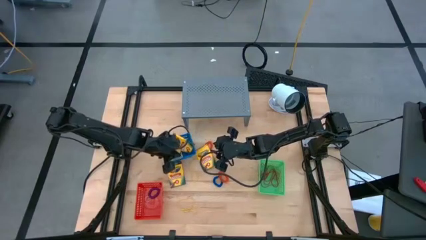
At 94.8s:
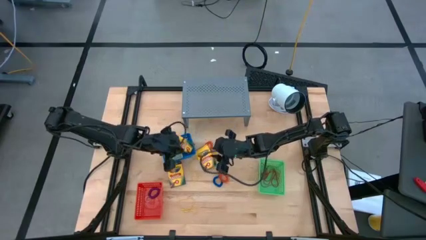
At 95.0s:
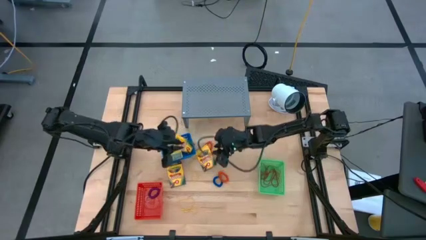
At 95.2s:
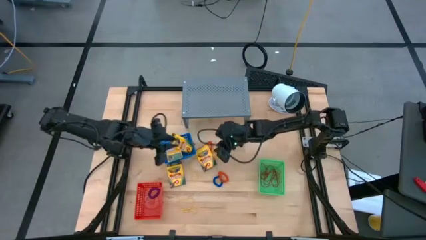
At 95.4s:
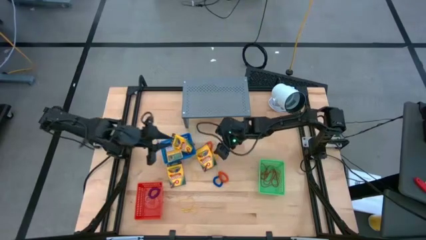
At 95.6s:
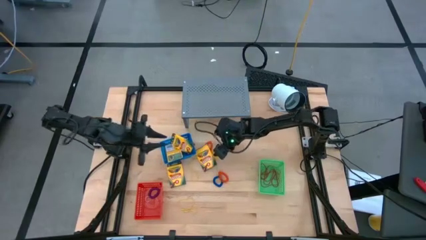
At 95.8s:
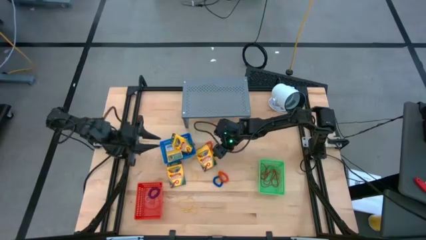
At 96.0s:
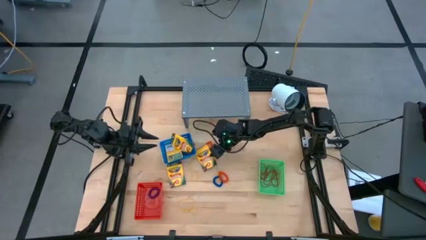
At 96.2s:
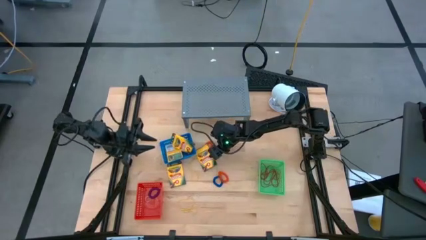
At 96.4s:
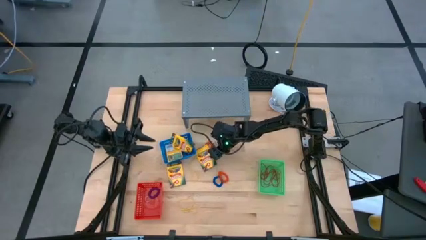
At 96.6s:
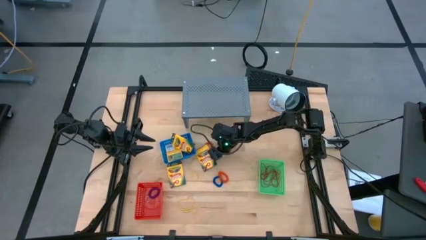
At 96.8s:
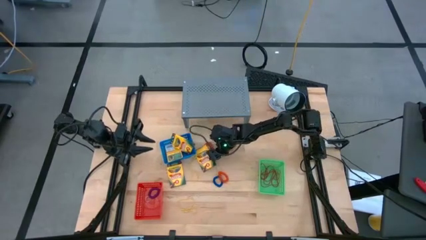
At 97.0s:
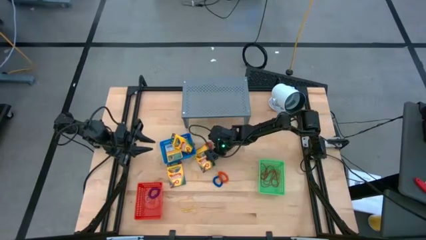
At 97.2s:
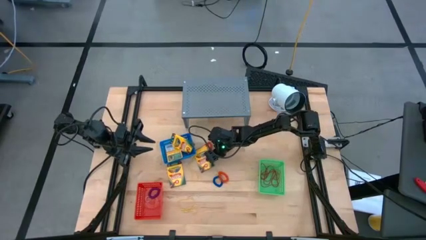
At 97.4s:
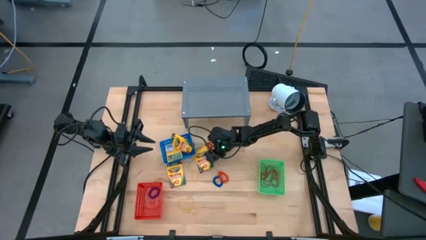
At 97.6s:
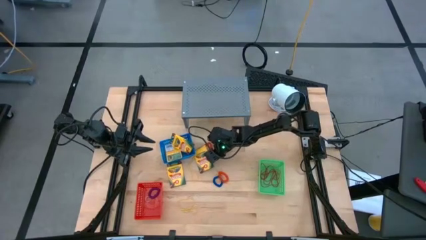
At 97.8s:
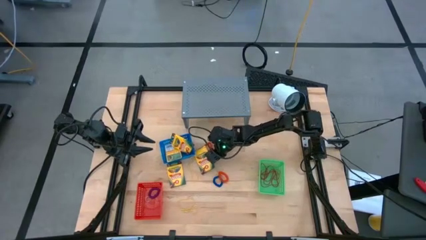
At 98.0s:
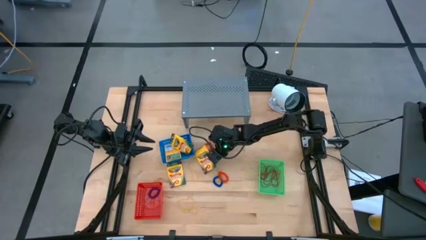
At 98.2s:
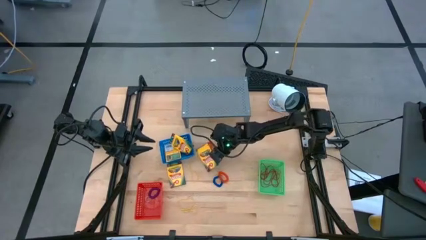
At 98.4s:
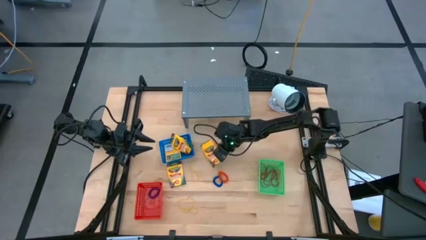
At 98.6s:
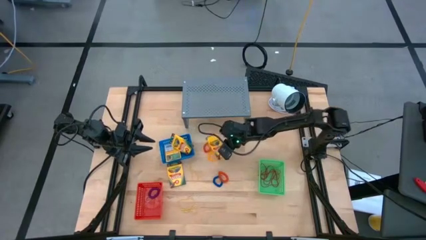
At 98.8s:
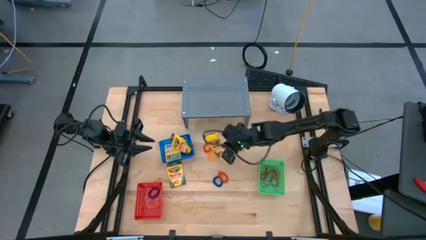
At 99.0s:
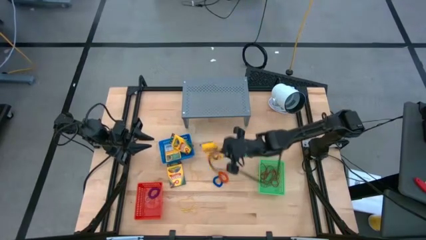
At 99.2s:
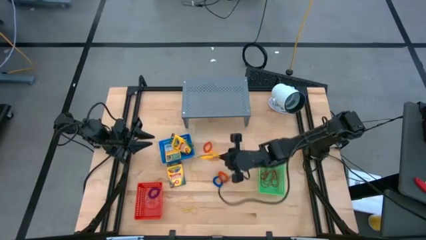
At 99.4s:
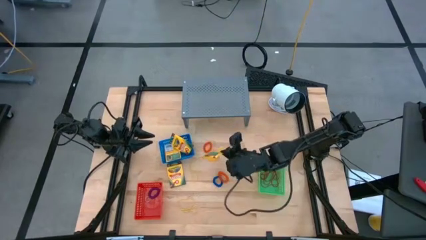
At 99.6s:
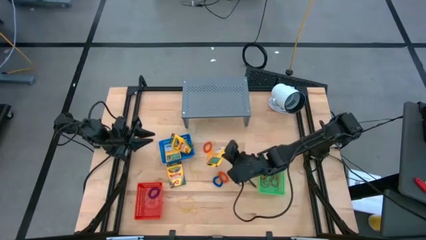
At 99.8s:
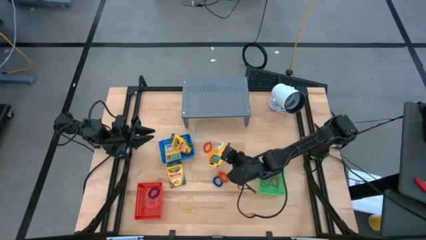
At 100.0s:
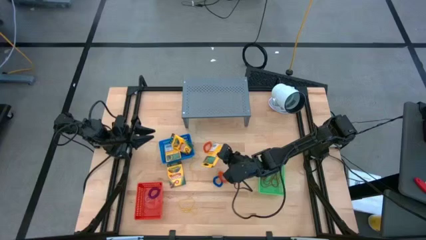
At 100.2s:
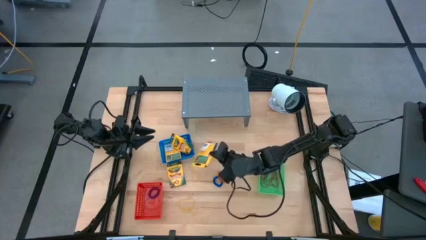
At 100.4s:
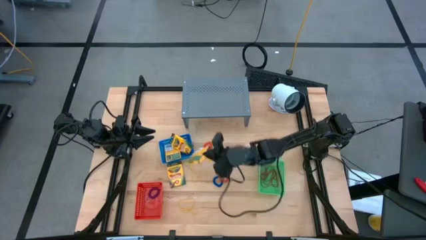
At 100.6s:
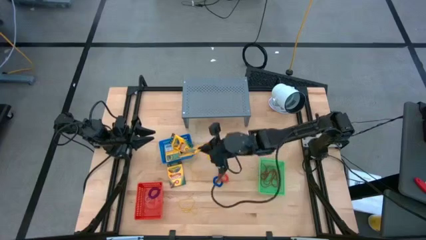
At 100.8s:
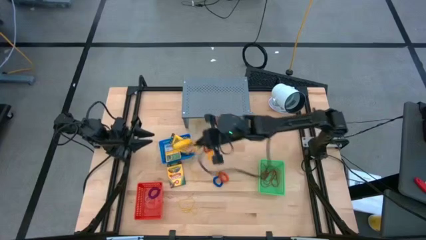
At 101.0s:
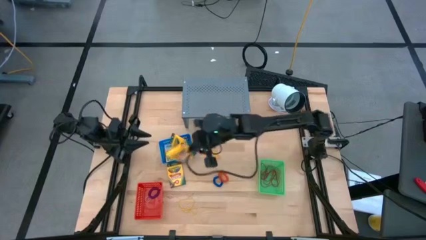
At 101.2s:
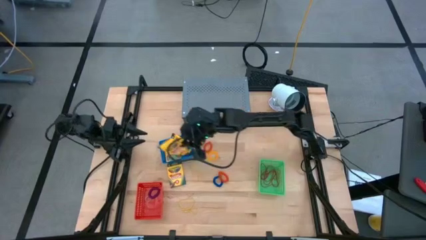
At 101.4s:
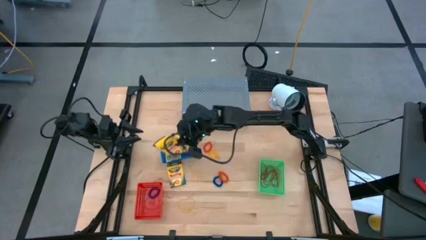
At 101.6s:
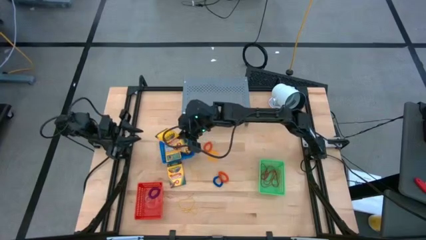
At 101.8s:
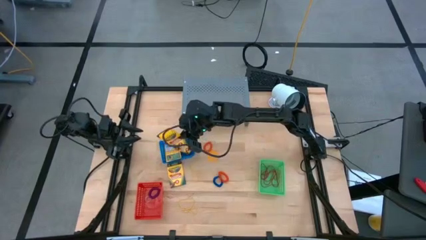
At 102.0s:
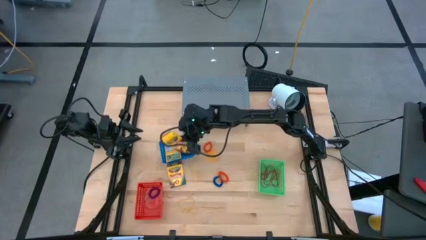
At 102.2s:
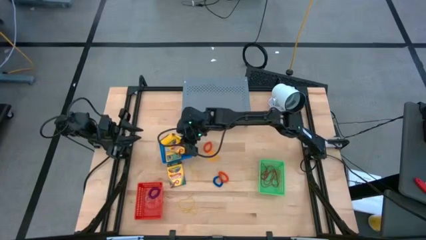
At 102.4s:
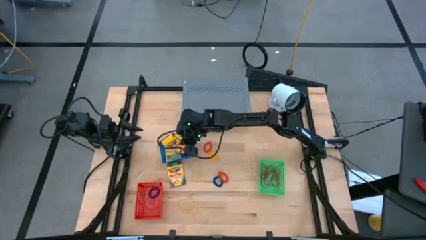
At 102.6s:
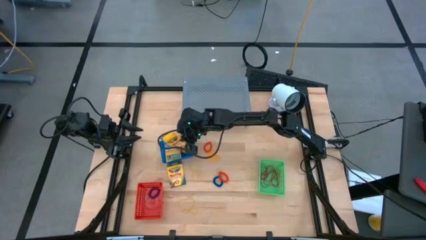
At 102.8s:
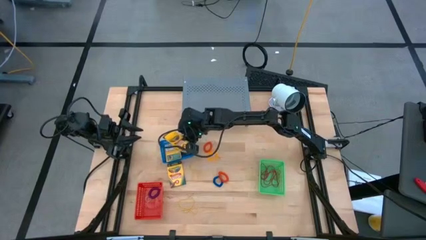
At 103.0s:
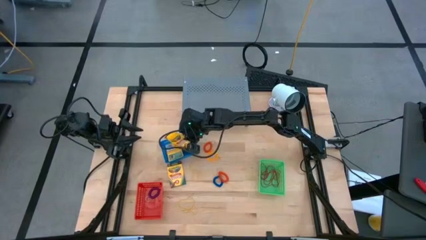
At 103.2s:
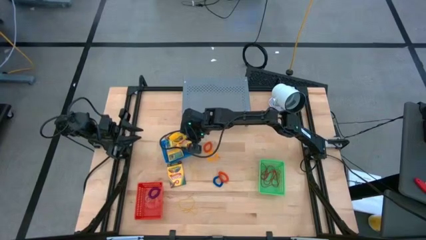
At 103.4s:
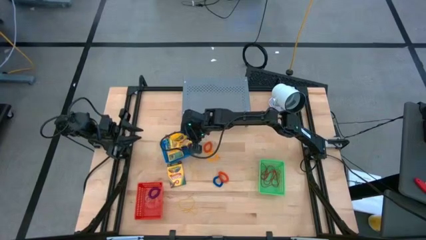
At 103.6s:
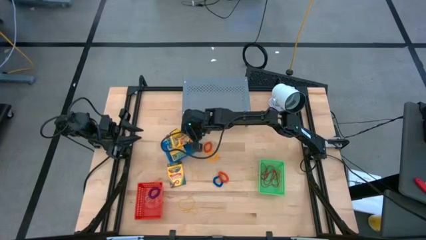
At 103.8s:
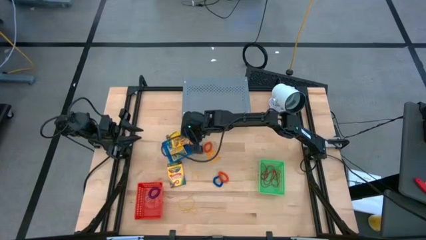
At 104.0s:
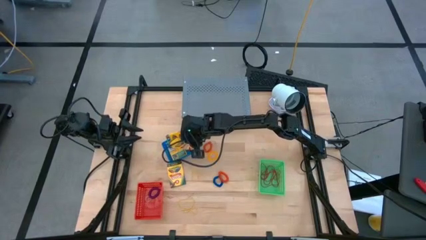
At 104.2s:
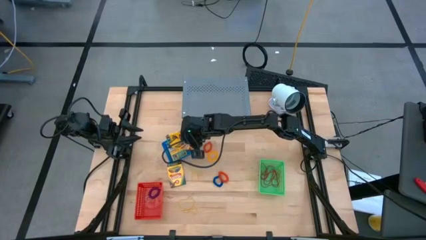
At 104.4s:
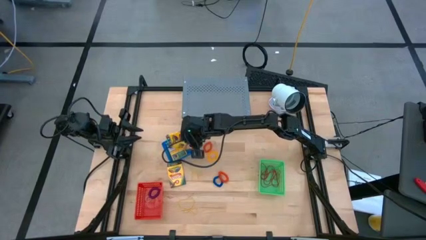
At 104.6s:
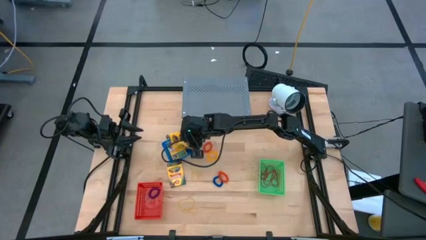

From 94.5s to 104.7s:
Task: Pick & Place Office Desk Supplies
Put the yellow crayon box into the blue bin

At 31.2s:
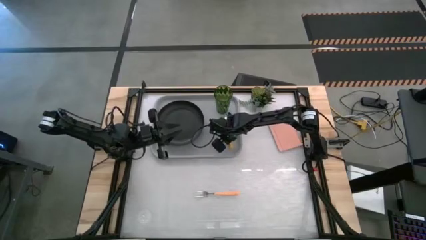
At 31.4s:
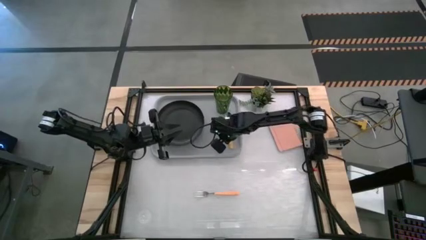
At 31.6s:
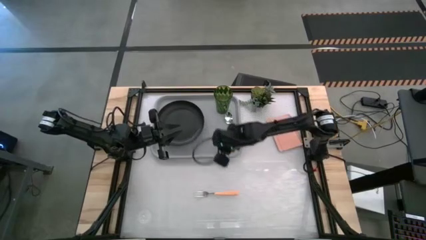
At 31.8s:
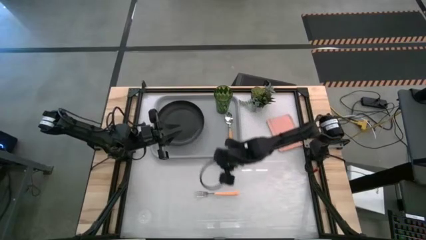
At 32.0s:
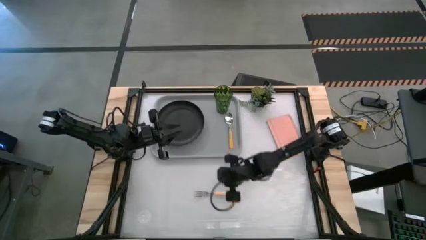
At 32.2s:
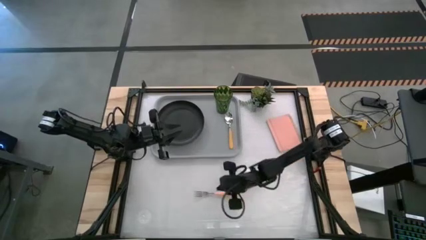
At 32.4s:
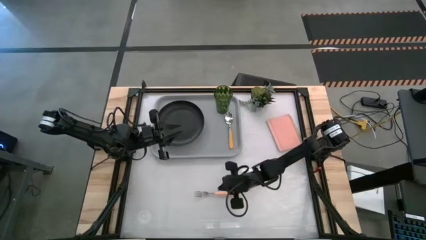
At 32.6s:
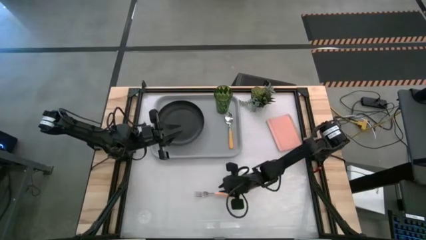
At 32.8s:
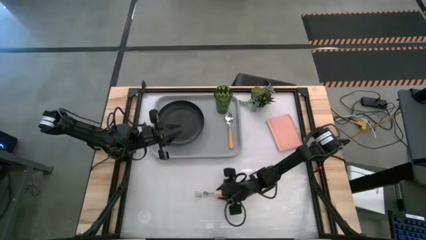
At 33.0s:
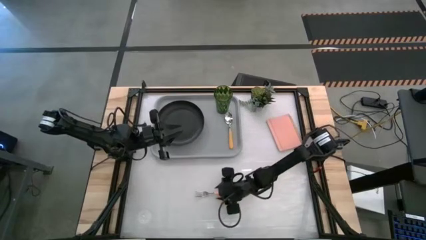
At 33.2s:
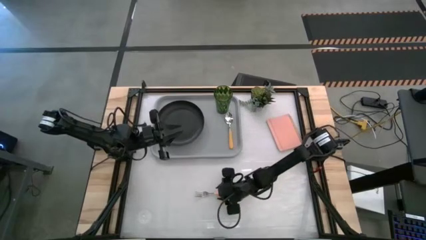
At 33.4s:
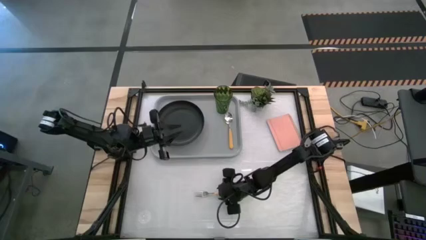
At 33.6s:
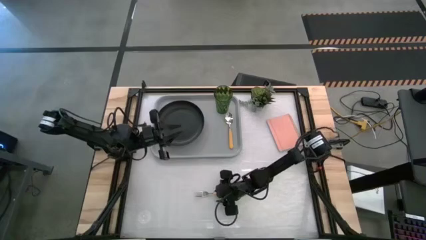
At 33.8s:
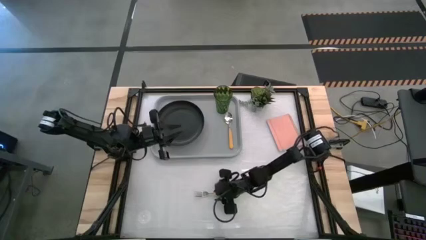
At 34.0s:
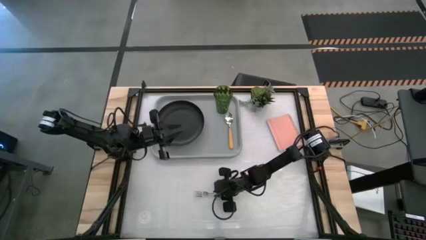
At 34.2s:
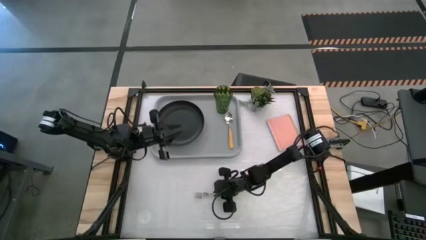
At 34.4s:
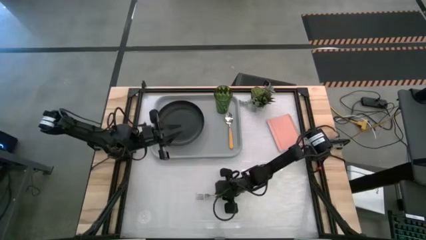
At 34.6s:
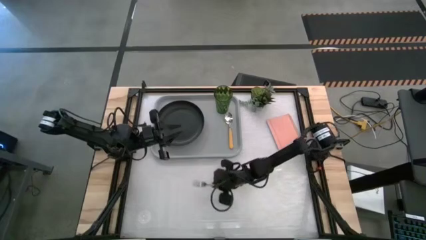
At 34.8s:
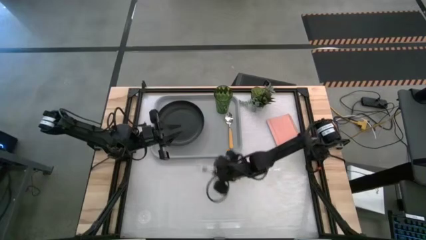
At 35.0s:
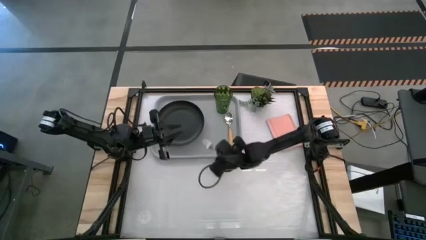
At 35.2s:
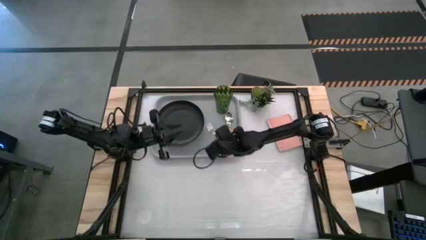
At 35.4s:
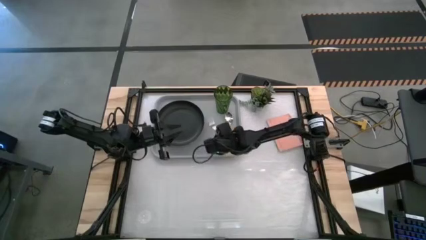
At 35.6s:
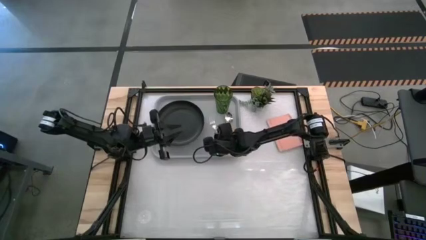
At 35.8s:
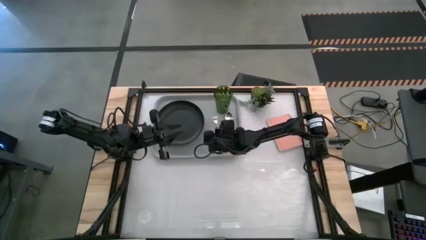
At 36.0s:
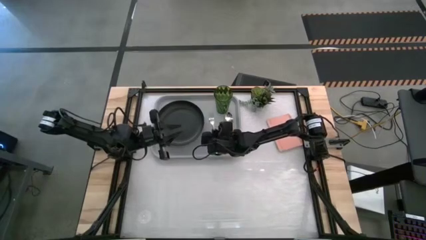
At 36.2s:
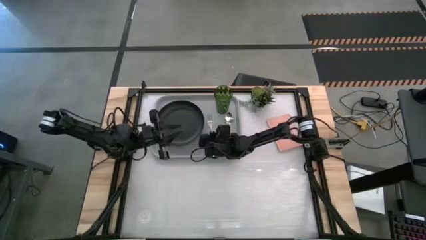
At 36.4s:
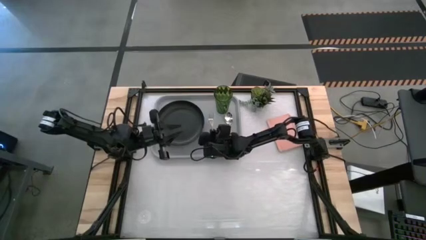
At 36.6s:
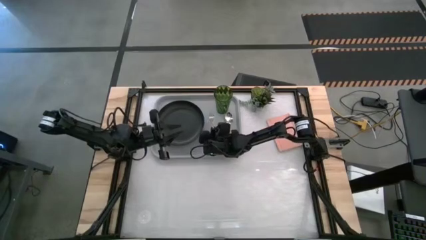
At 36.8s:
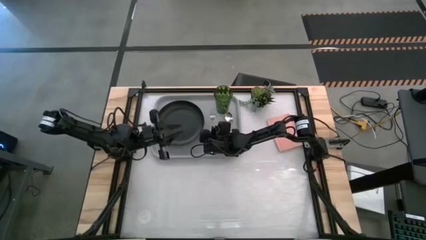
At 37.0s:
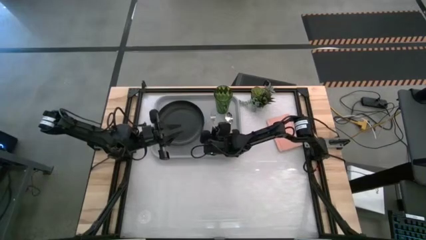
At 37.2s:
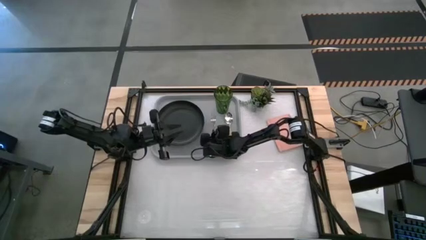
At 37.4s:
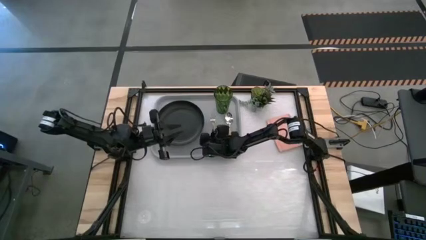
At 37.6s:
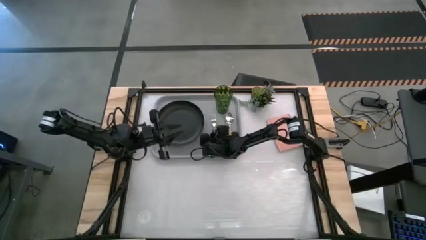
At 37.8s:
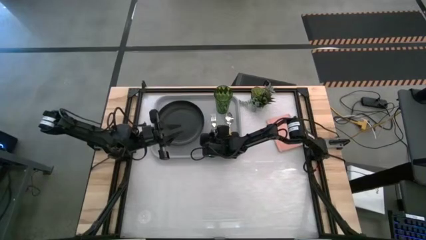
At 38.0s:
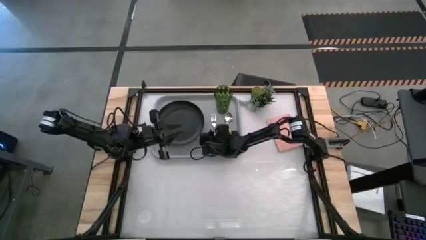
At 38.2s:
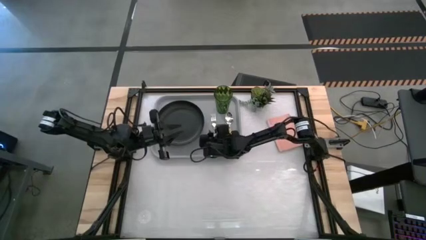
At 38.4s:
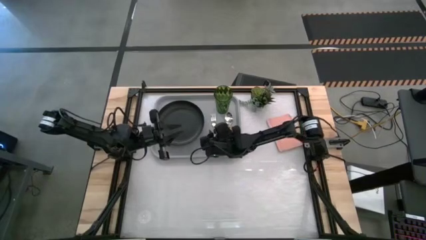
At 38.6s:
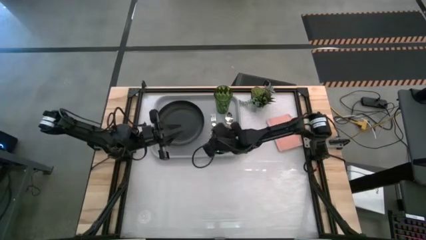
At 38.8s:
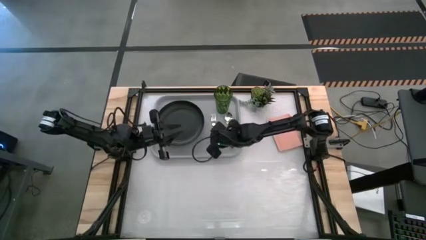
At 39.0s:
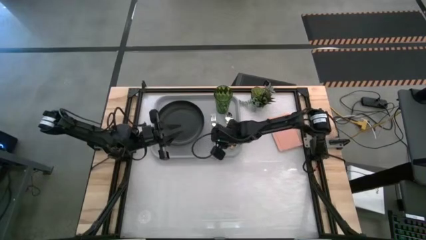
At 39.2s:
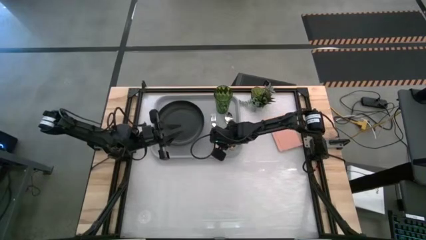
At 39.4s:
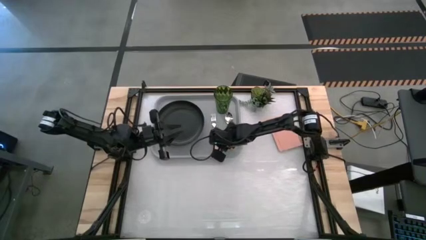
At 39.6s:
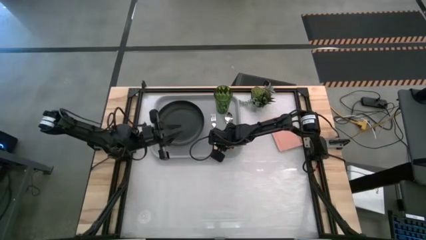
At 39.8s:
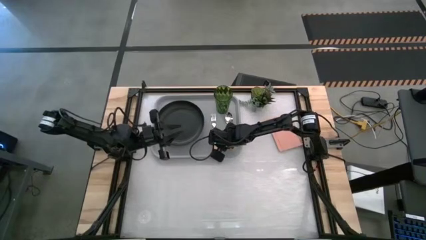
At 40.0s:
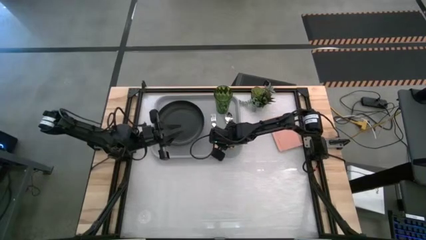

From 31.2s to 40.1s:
Task: Pick and place plate/cup/fork/spoon on tray
Put the brown fork on the gray serving tray between the brown spoon and black plate
